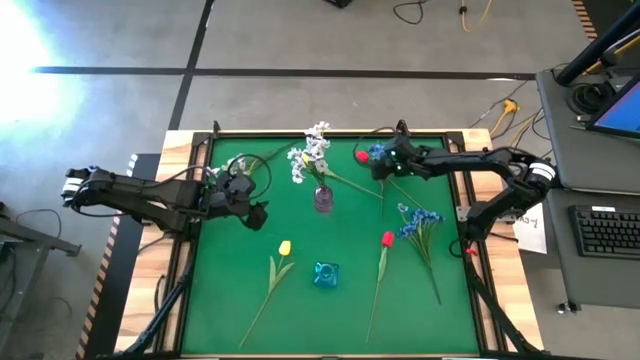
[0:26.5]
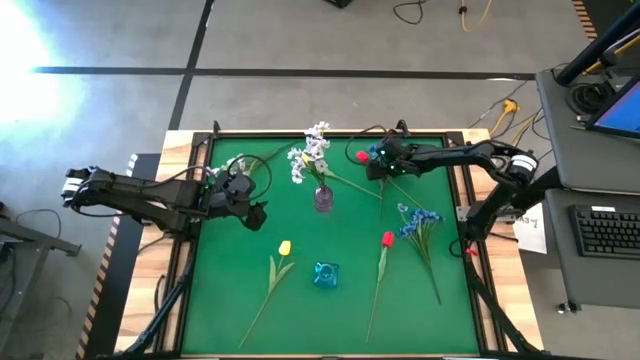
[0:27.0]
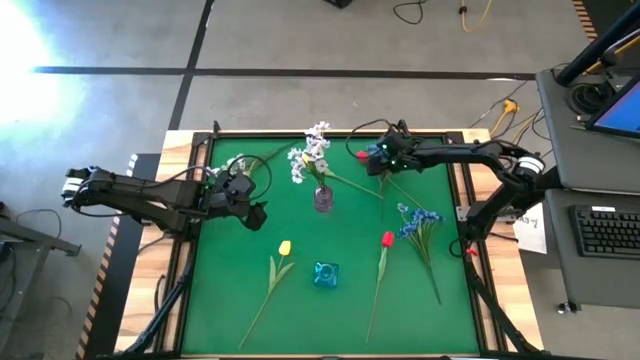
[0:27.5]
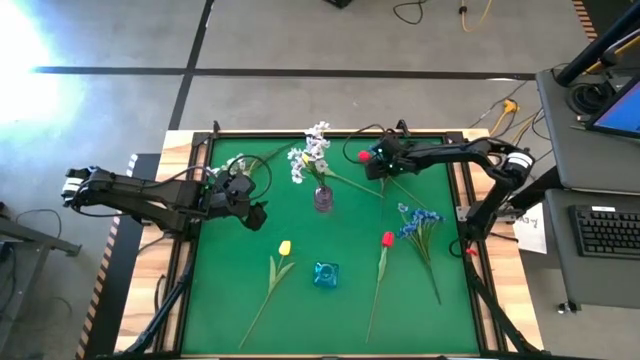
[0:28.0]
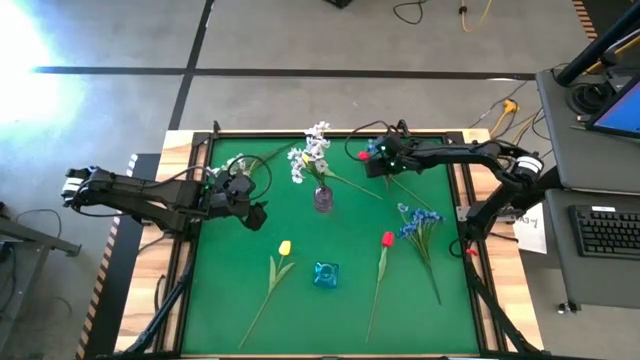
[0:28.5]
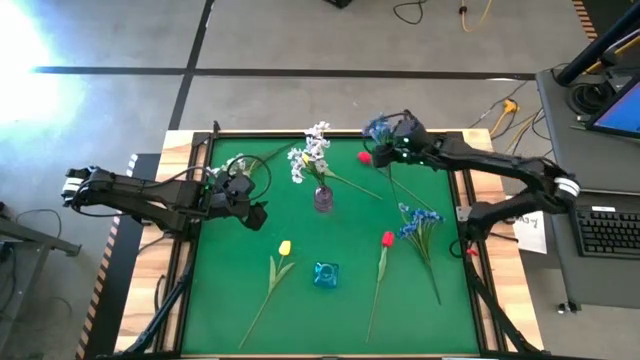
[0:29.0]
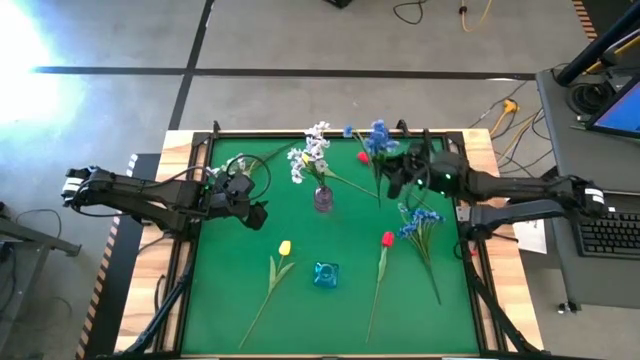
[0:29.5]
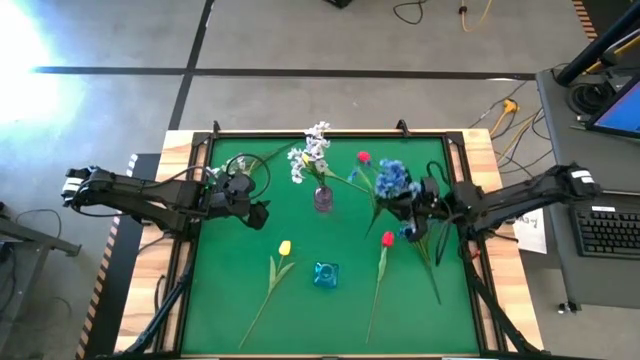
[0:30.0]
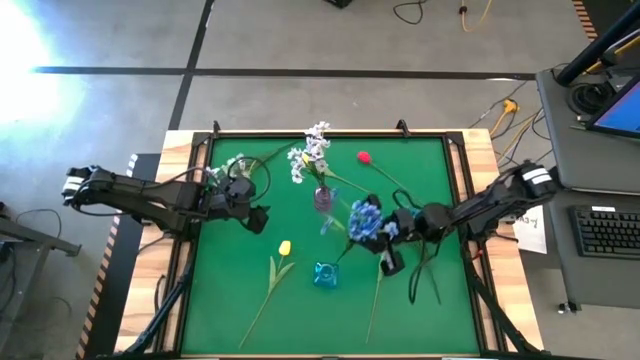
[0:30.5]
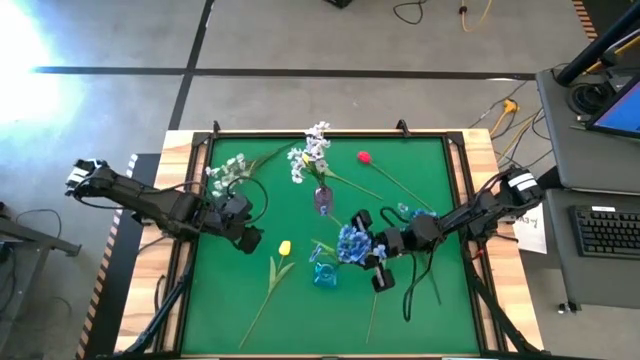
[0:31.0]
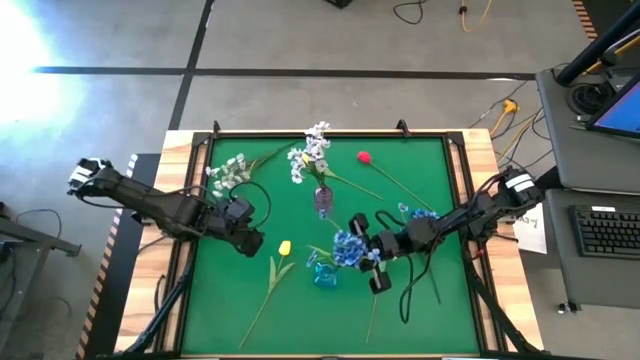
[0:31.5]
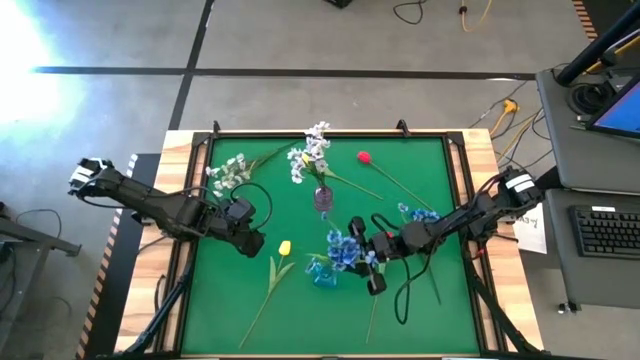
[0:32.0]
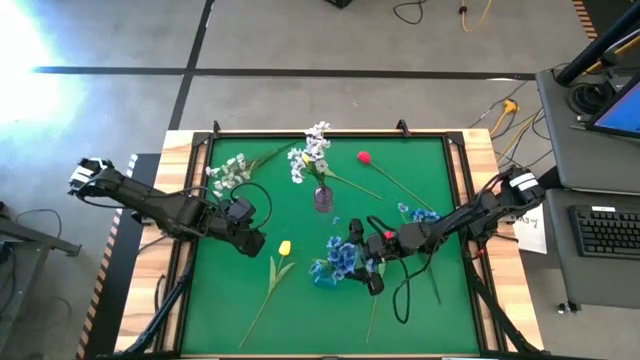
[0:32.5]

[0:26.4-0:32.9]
Task: Sort flowers into vase by color
Put the top blue flowers into the blue vase

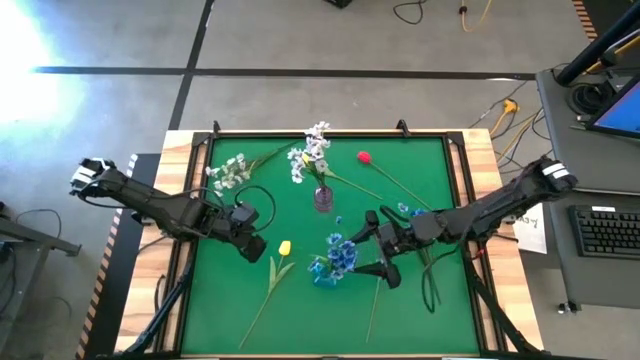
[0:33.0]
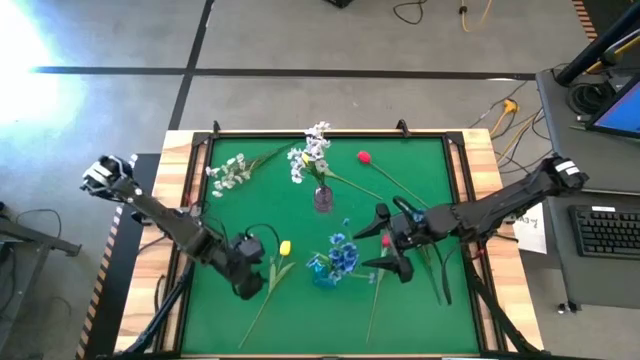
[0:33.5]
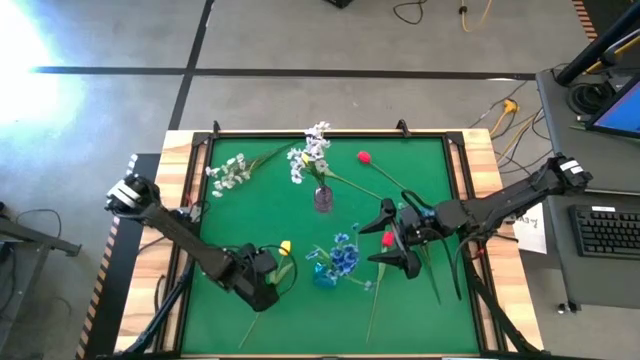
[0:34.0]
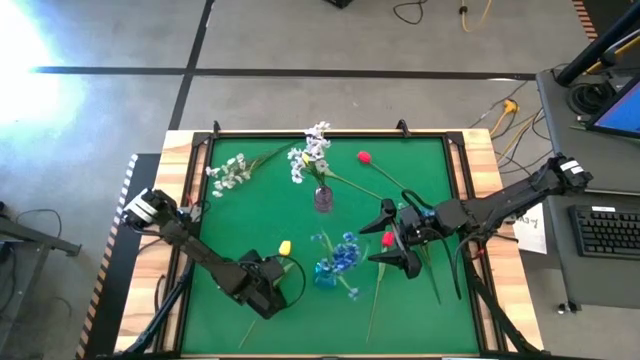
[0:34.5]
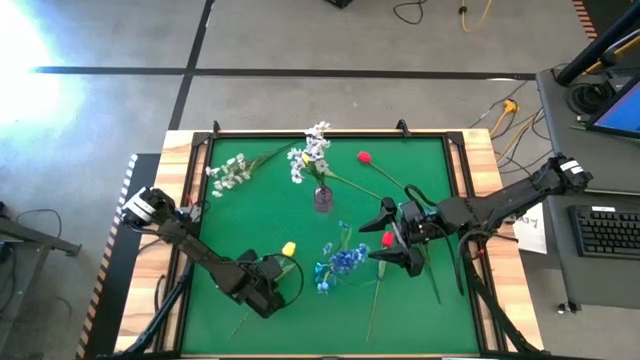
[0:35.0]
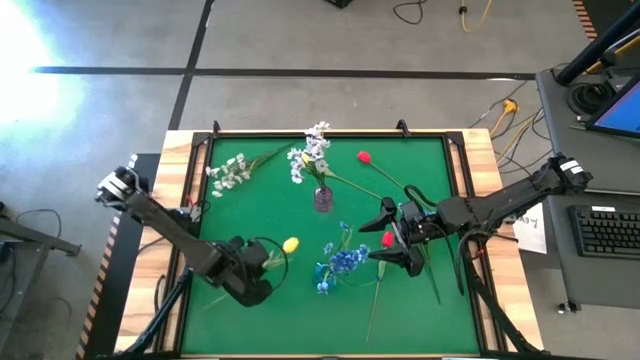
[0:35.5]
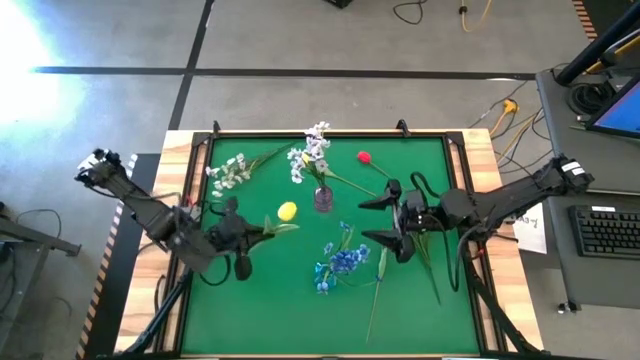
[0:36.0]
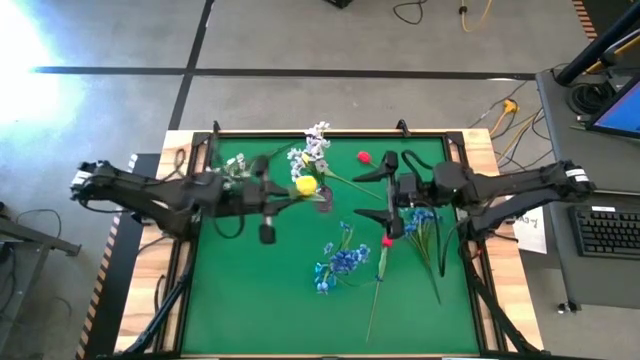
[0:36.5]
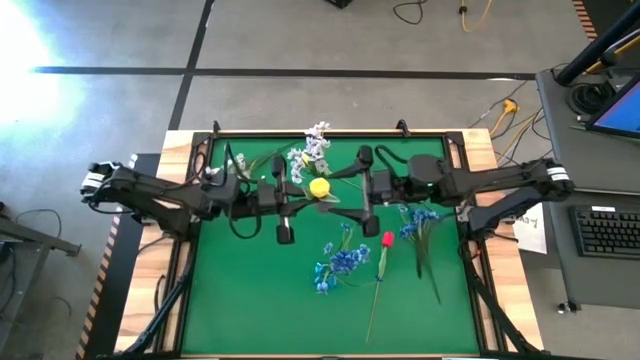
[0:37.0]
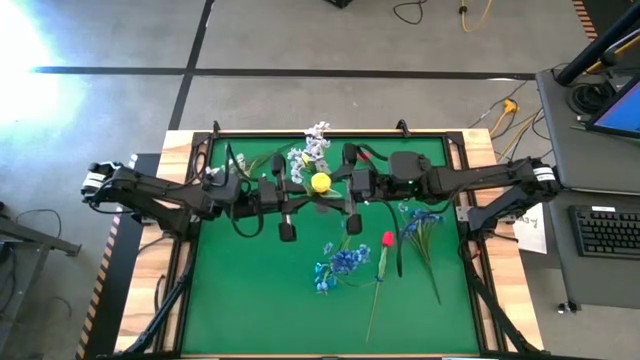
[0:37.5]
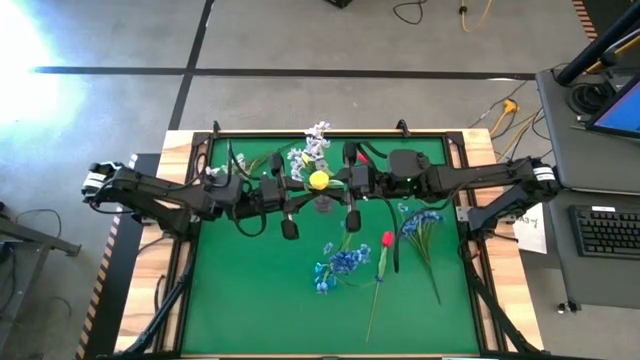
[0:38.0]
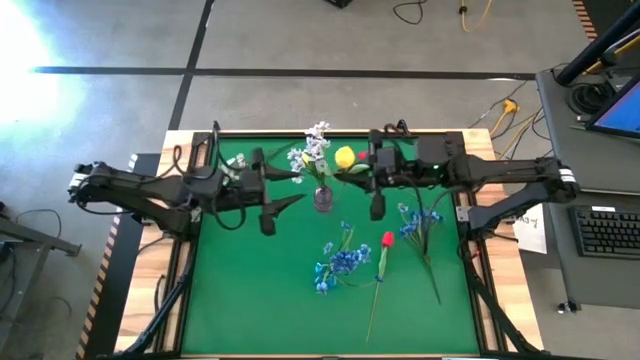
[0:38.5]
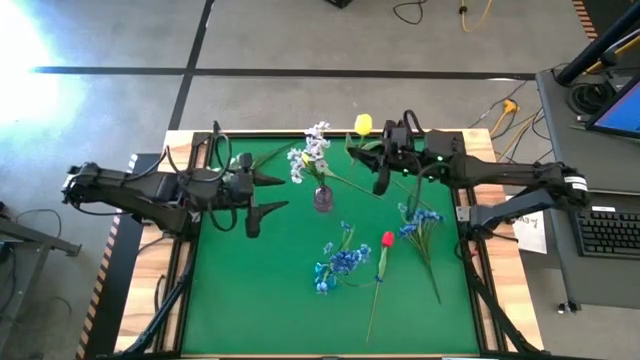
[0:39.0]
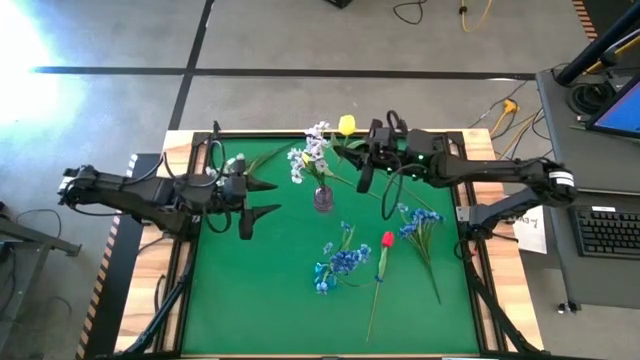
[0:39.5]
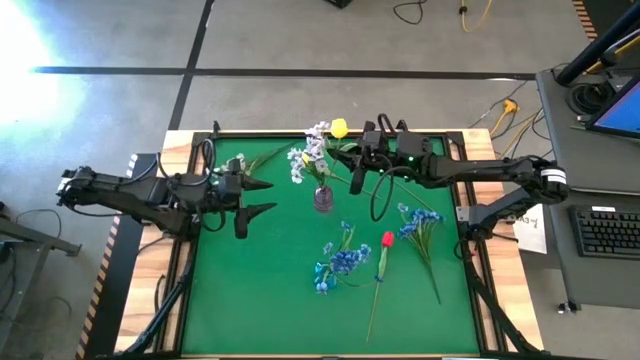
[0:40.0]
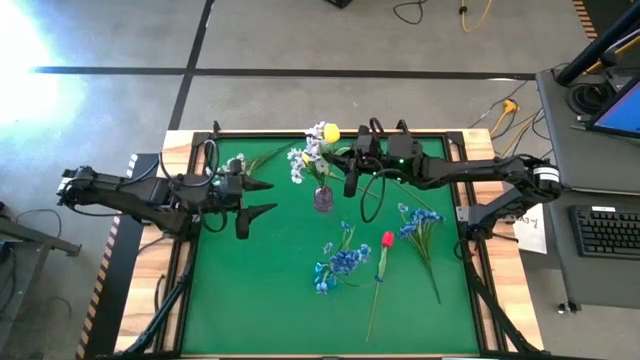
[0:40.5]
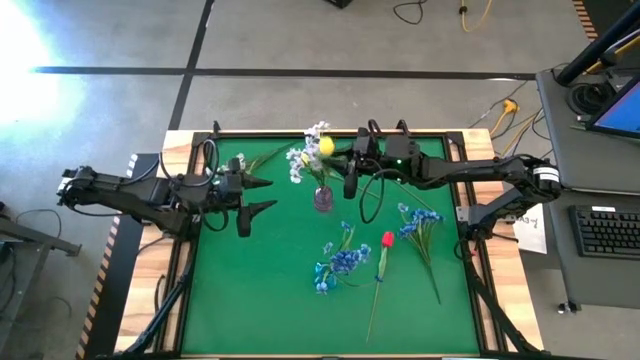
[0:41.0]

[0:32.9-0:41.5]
Put the bottom yellow flower into the violet vase

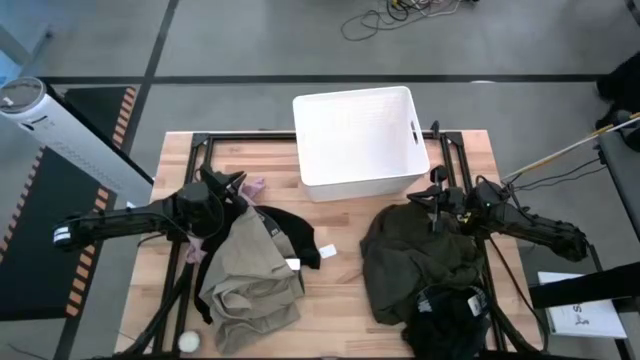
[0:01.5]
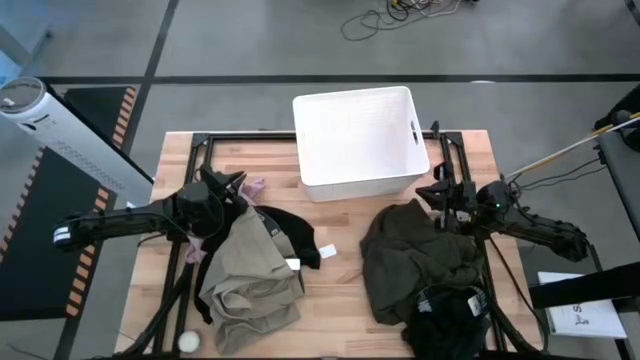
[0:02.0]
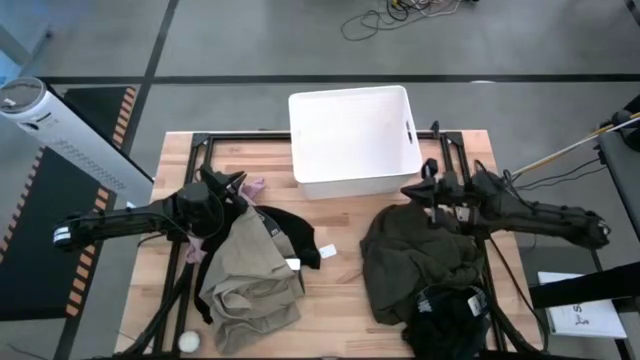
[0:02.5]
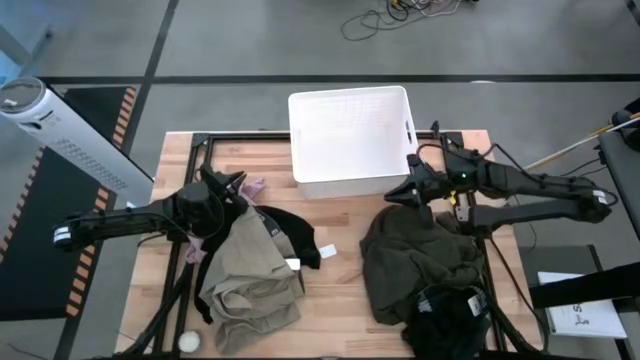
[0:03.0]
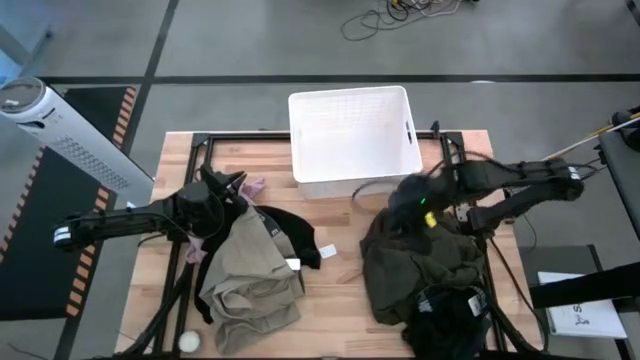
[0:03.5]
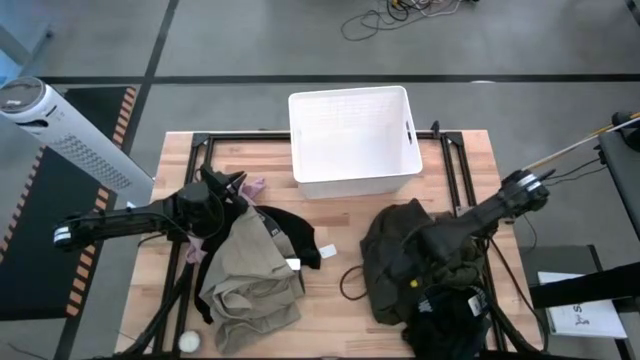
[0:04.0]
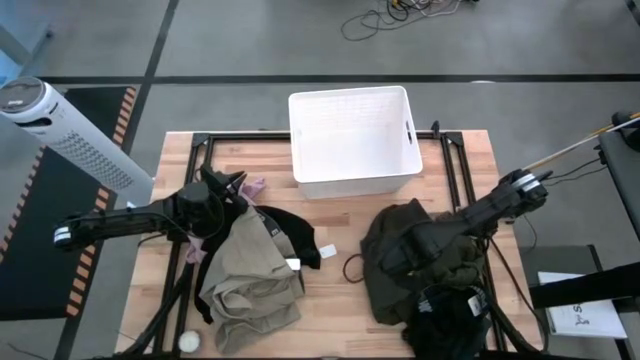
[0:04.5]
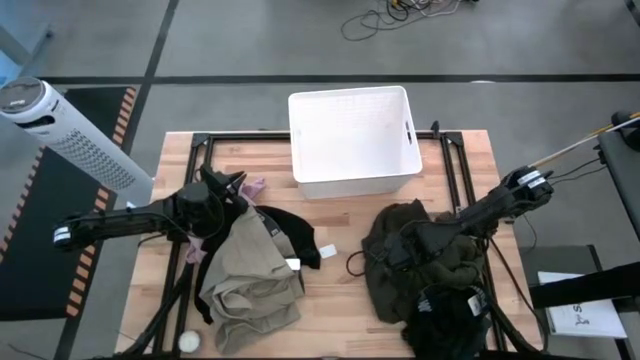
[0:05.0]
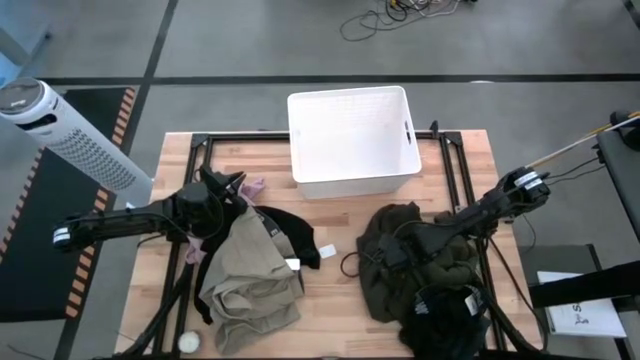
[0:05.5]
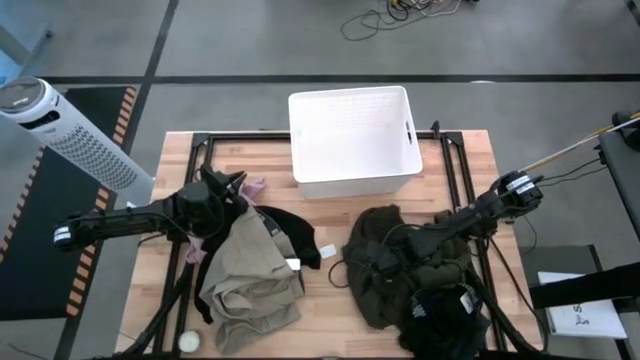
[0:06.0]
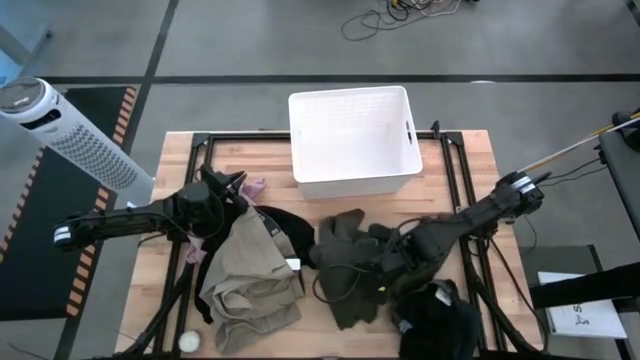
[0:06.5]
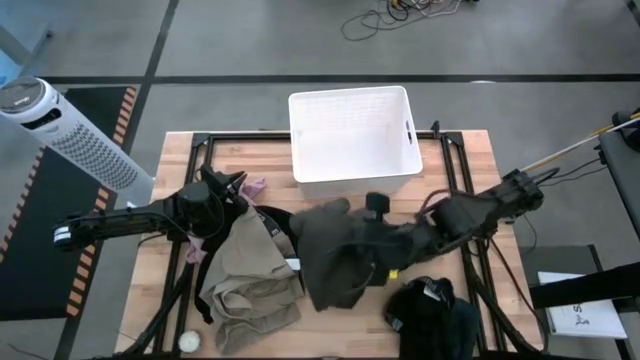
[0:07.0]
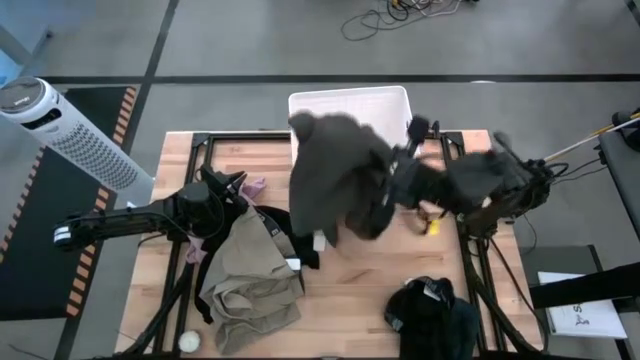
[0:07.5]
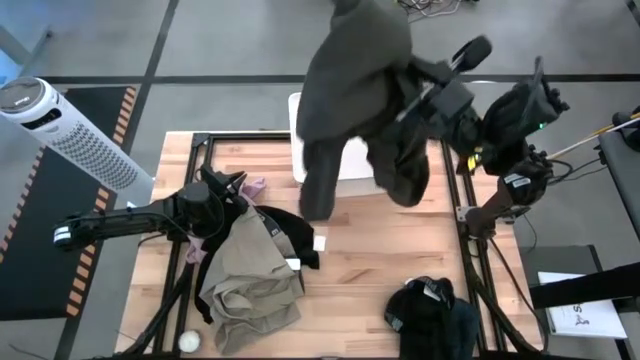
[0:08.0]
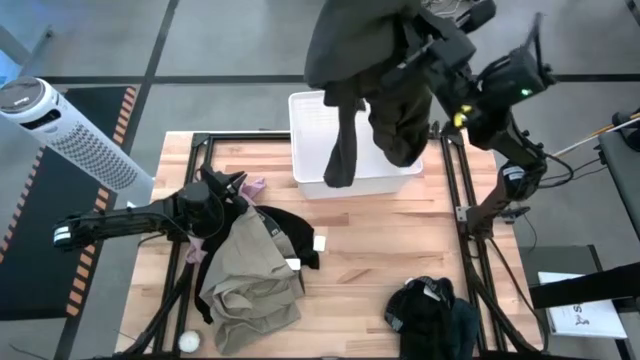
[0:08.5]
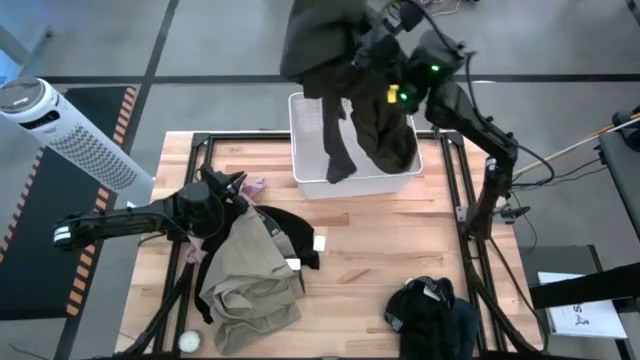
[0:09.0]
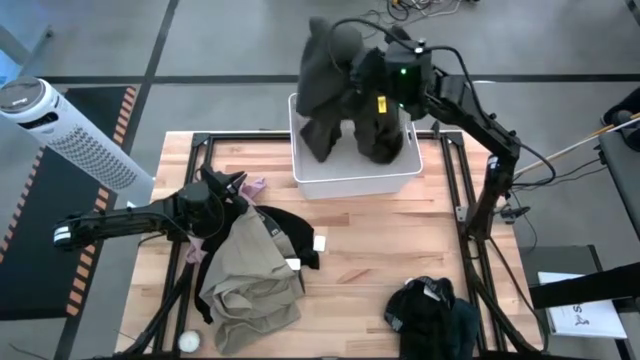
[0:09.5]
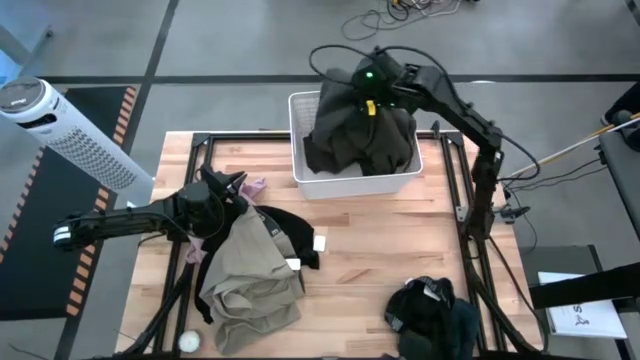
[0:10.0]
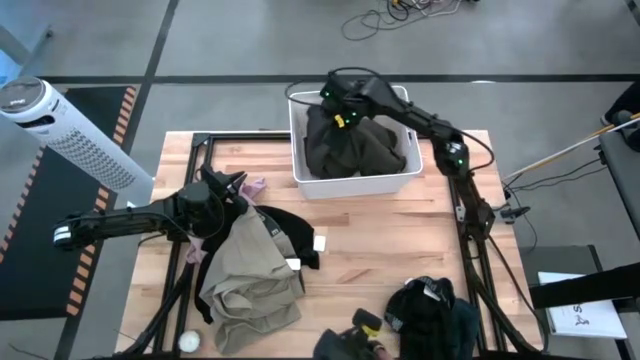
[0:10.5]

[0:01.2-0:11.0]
Task: Sort clothes
Put the black jacket into the white laundry bin
